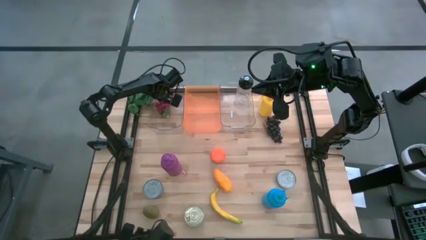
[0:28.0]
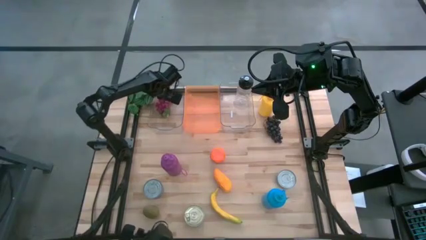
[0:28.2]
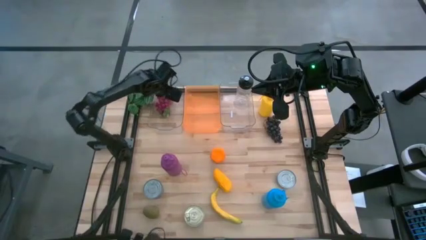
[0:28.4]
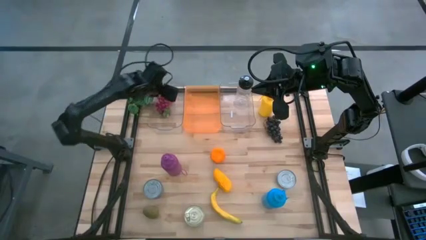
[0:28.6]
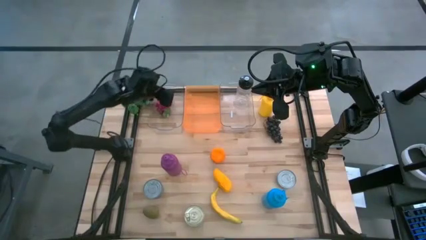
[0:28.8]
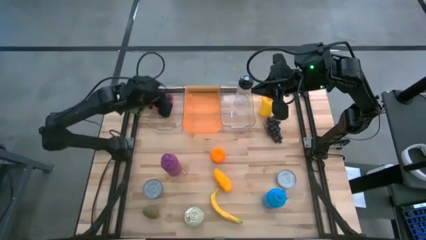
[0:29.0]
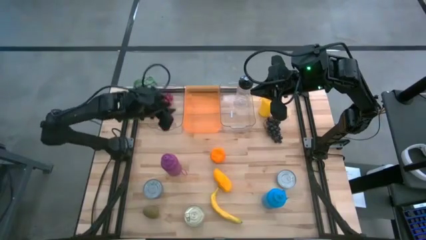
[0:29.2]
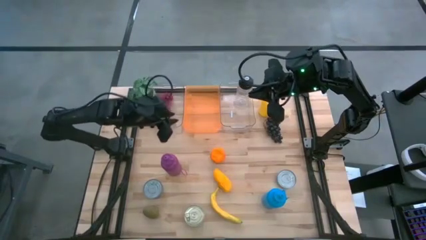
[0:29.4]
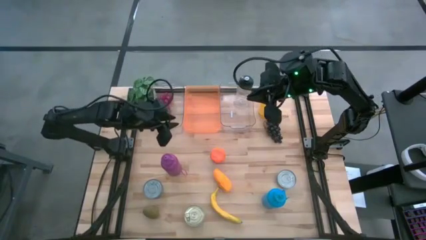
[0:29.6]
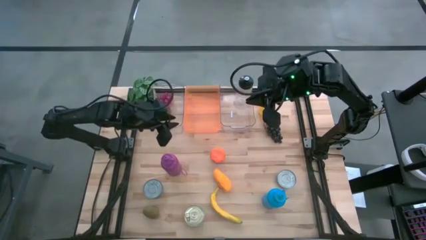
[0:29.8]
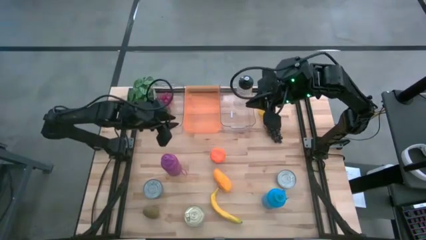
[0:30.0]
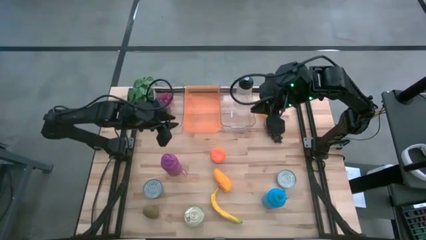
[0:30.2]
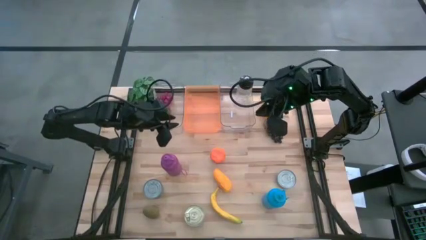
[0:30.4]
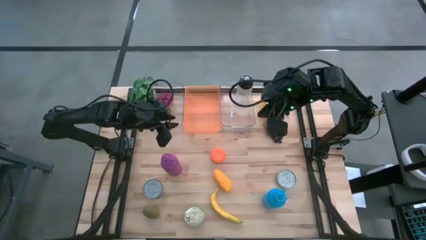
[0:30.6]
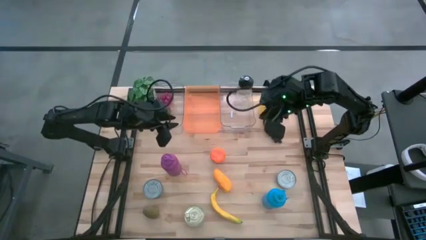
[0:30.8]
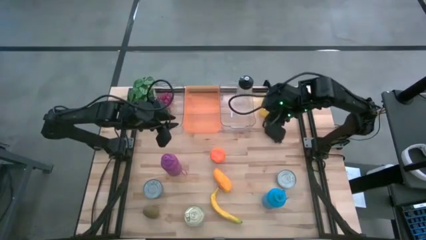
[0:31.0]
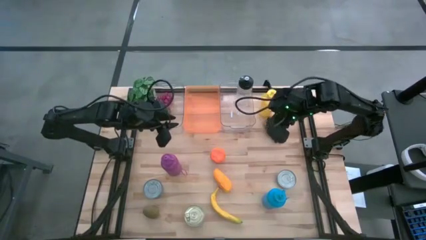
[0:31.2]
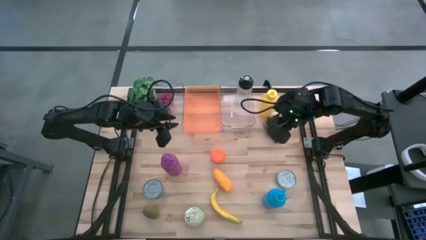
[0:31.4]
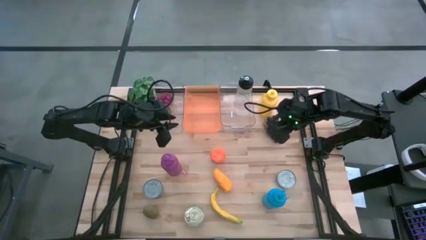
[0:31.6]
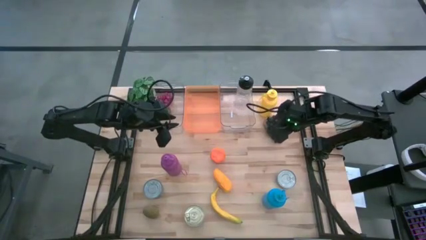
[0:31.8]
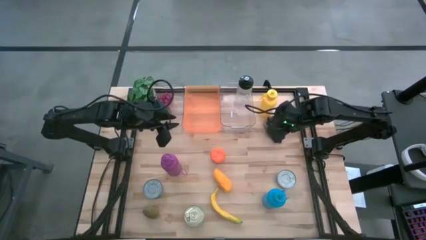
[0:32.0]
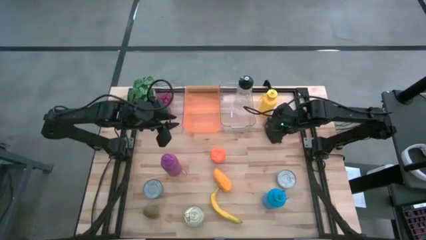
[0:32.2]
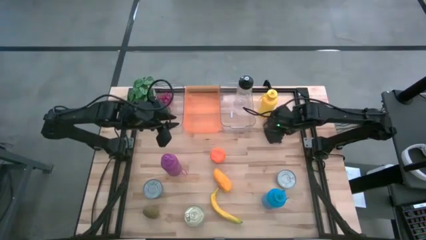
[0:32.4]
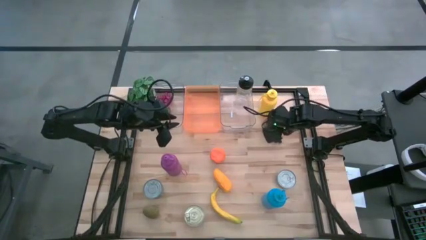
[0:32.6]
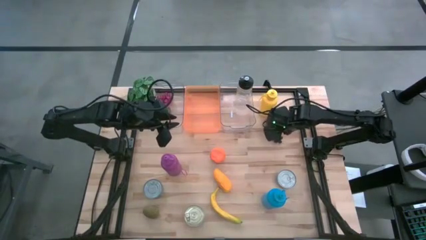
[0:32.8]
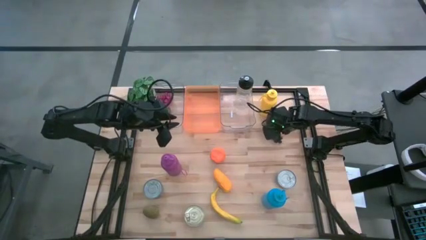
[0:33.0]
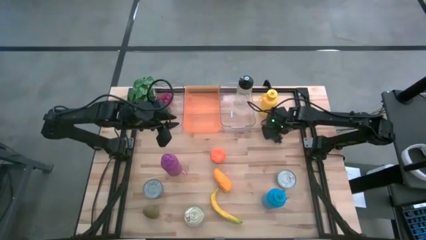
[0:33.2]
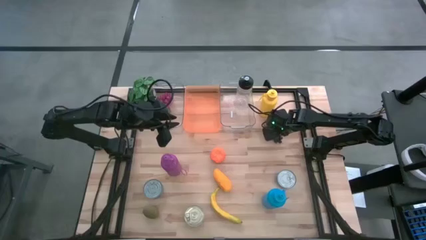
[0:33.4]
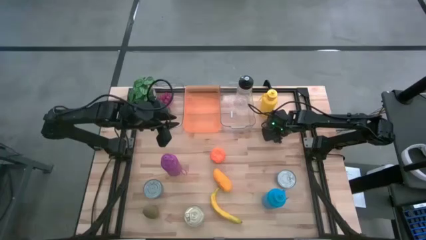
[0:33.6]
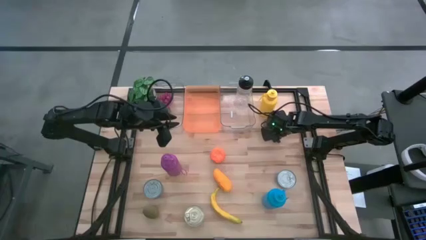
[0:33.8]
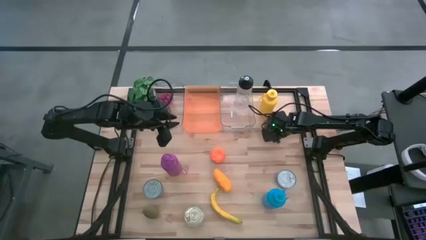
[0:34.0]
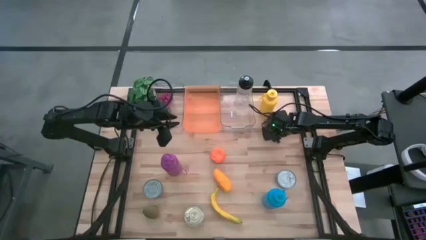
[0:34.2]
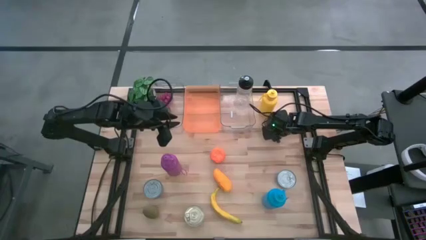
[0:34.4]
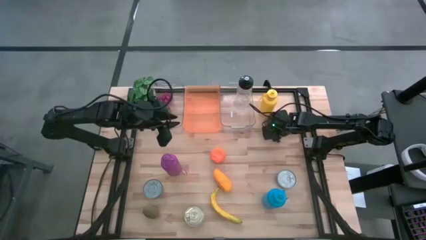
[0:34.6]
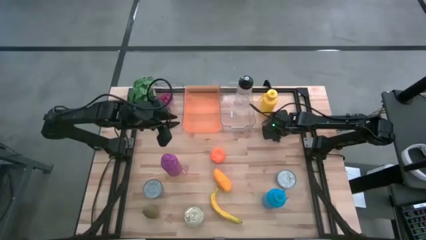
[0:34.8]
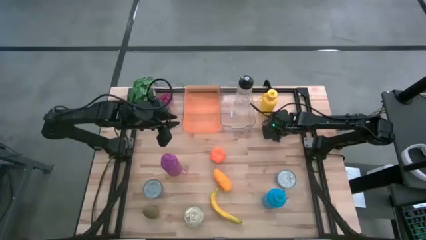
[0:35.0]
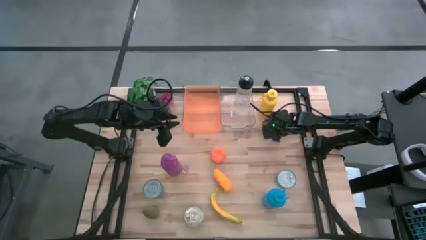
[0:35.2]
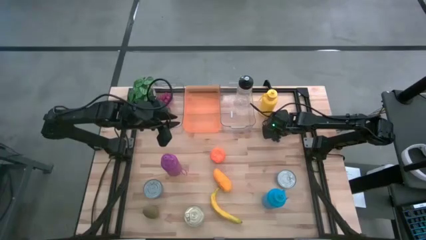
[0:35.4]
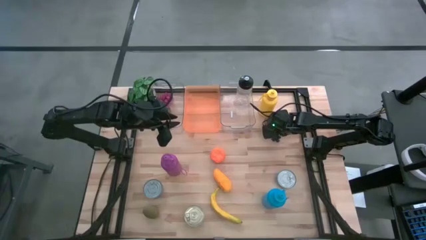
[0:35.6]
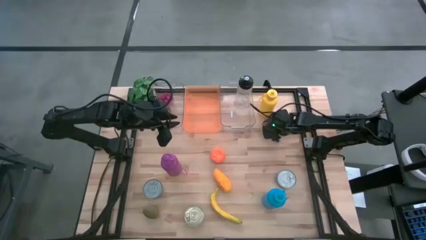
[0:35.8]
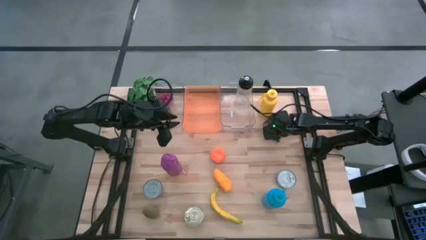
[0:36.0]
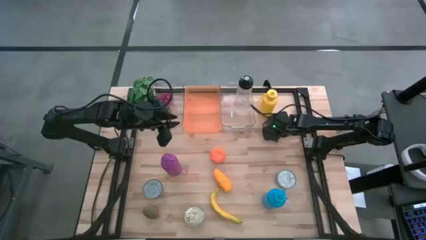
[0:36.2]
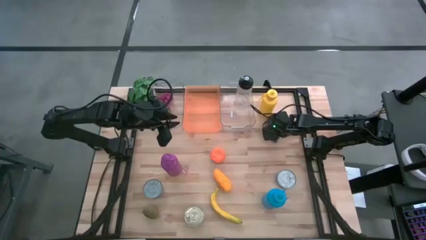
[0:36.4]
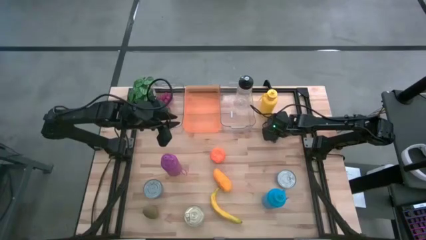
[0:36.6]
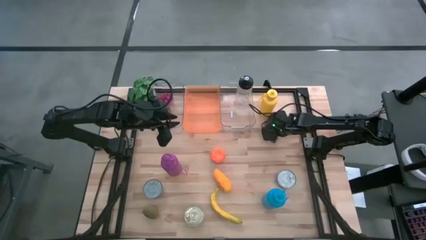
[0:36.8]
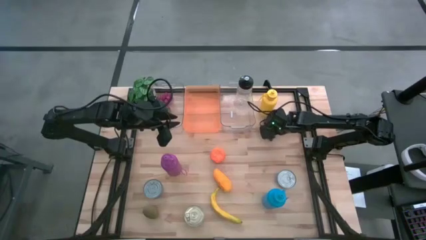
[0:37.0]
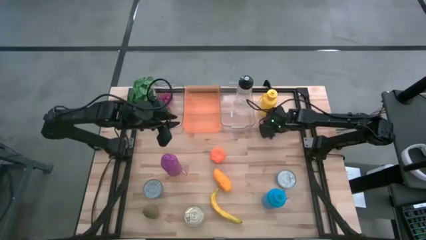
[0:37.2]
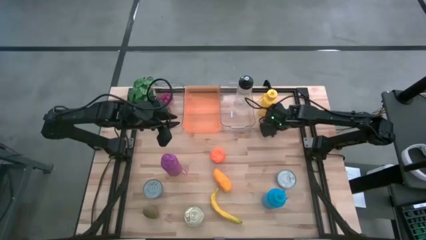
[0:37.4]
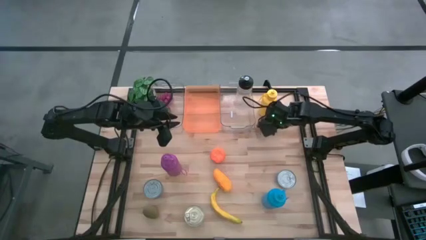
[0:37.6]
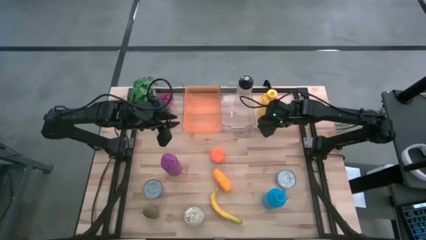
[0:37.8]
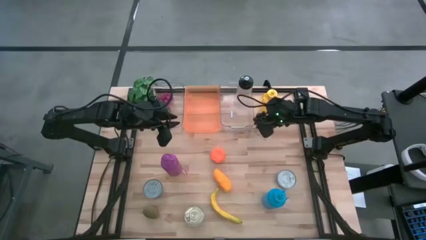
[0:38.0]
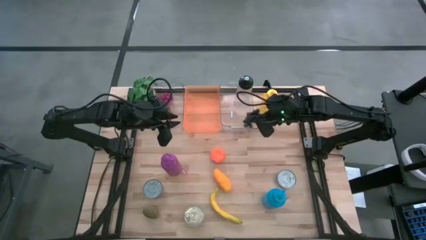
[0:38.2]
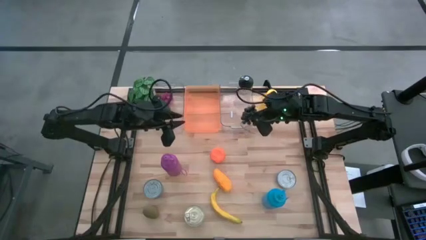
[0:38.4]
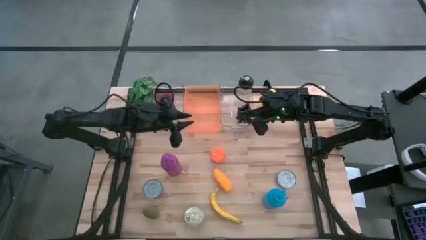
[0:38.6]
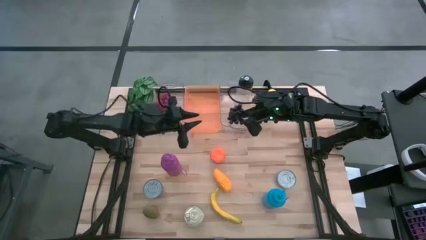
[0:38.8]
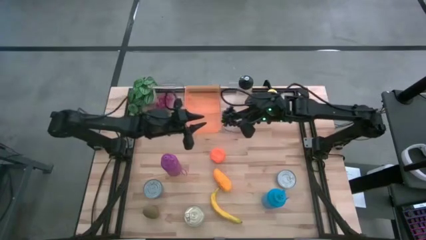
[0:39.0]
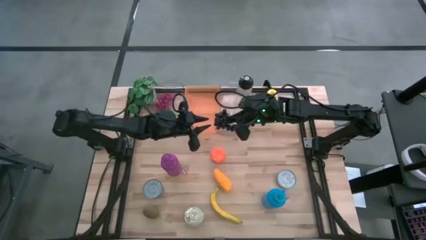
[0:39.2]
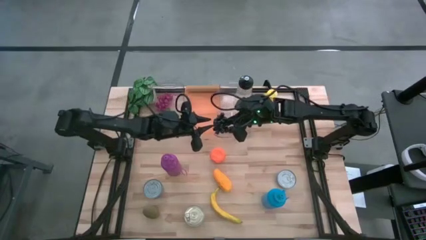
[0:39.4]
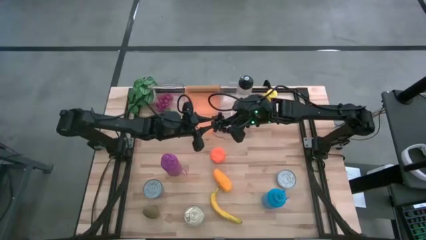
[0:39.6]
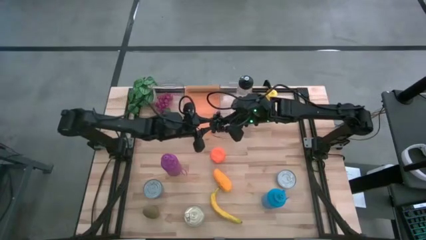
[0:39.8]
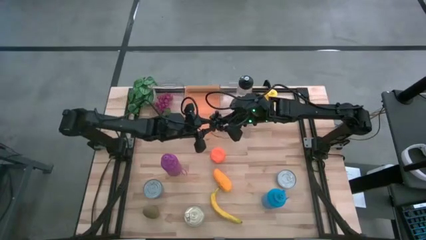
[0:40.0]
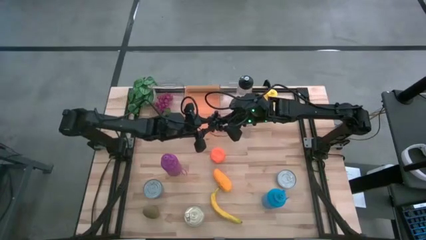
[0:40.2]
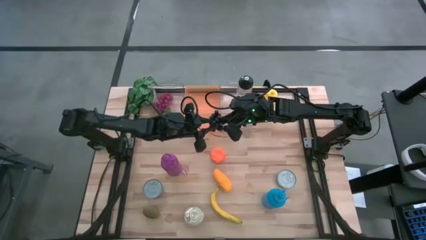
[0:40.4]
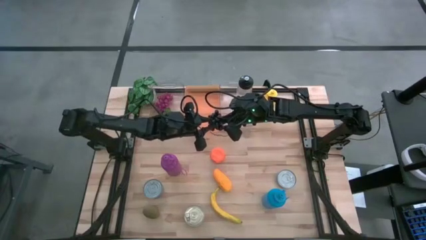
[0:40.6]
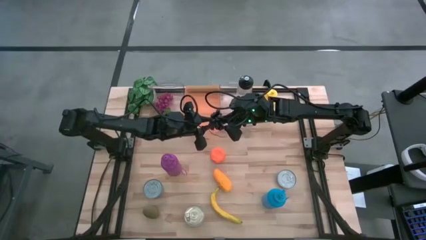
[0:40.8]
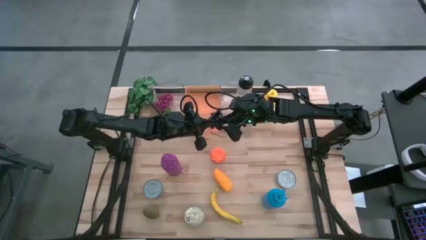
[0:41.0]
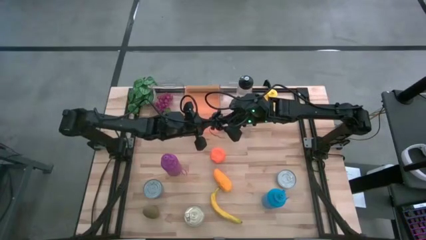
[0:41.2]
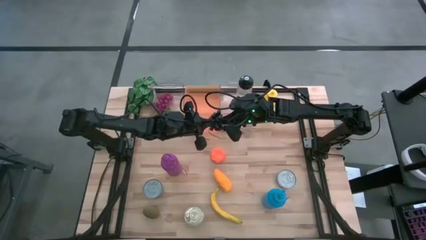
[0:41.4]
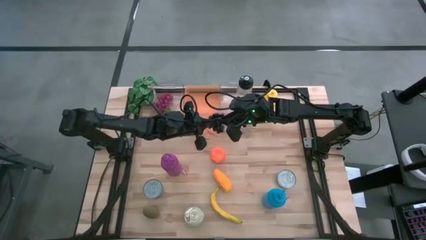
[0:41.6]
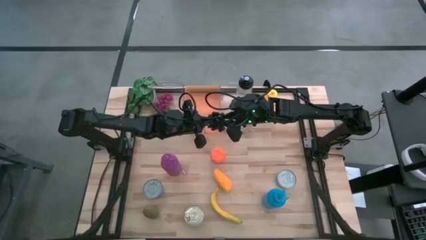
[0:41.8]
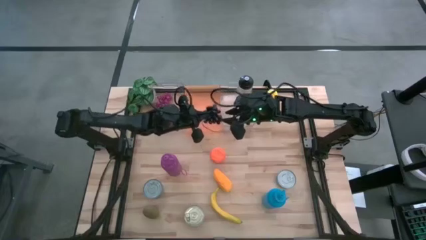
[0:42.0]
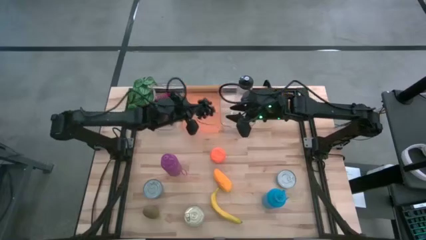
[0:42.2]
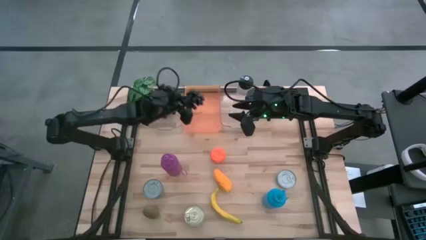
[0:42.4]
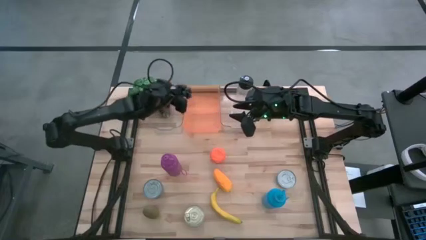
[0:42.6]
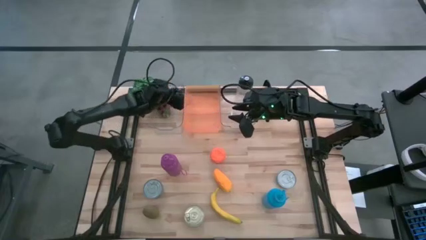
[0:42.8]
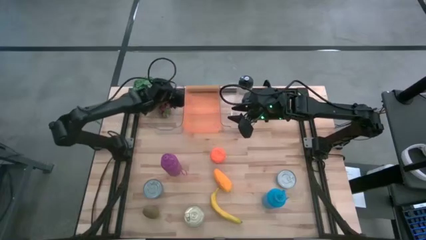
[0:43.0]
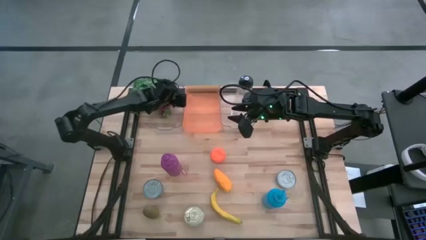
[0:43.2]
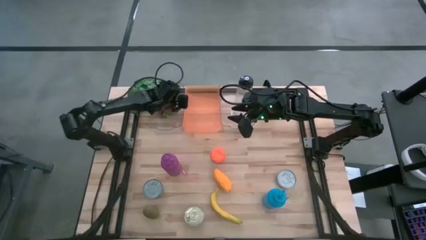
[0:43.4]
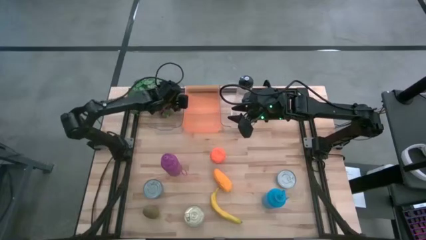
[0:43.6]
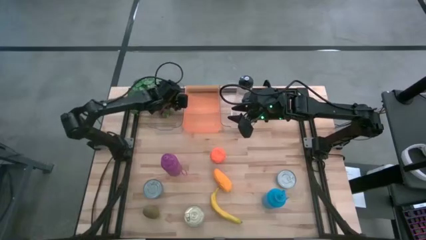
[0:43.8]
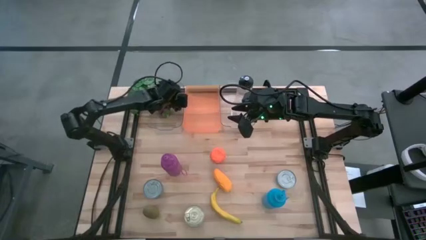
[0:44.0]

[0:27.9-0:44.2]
Task: Pick & Place Food Item
Put the black grapes into the left transparent bin
